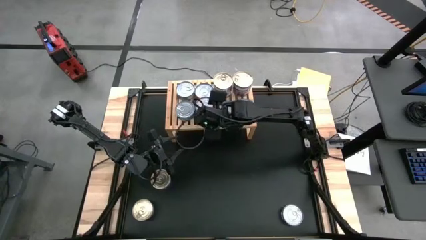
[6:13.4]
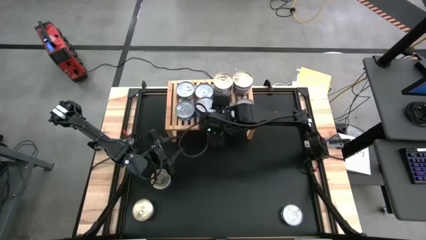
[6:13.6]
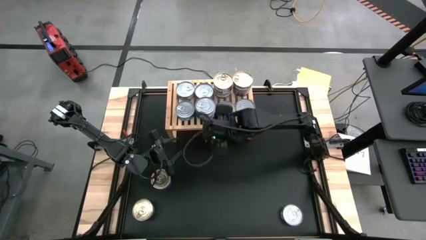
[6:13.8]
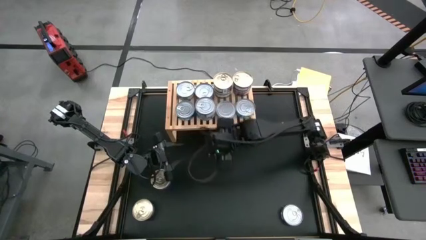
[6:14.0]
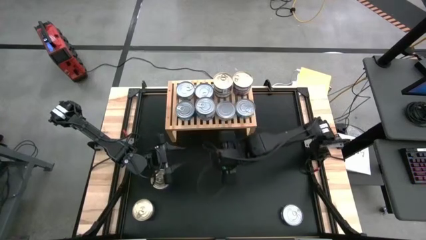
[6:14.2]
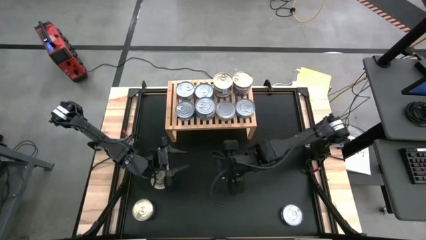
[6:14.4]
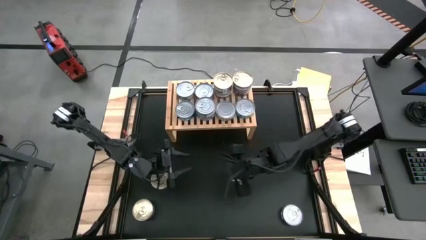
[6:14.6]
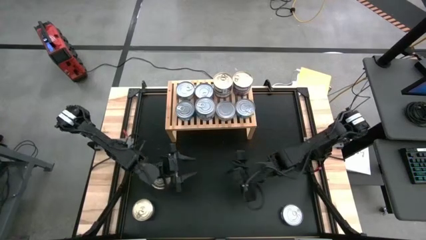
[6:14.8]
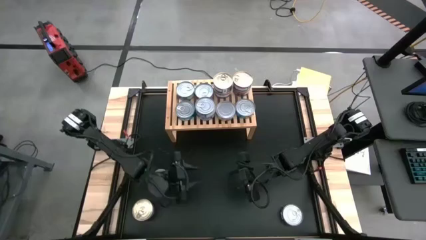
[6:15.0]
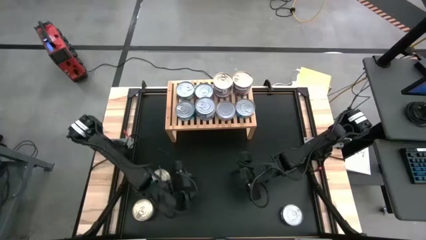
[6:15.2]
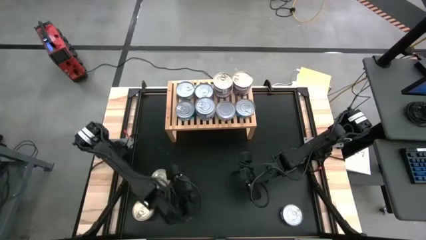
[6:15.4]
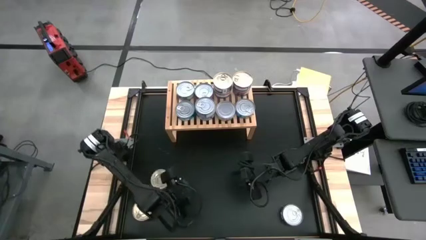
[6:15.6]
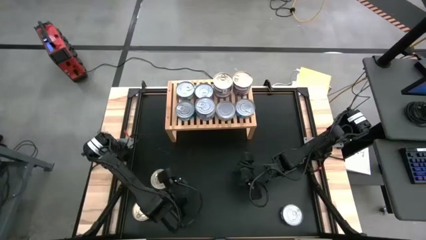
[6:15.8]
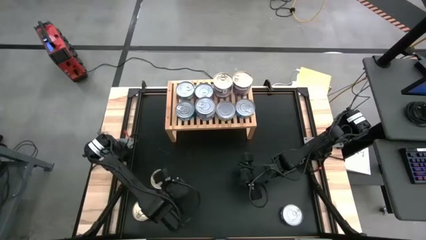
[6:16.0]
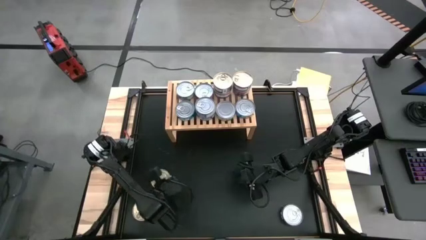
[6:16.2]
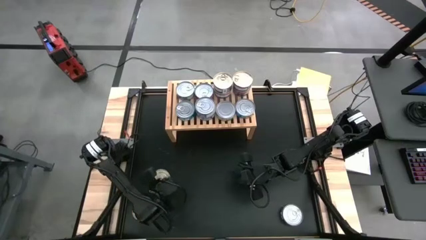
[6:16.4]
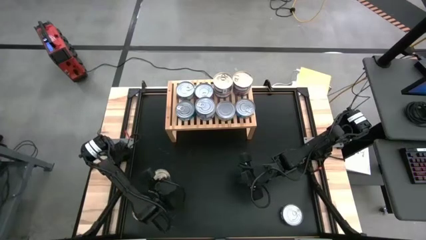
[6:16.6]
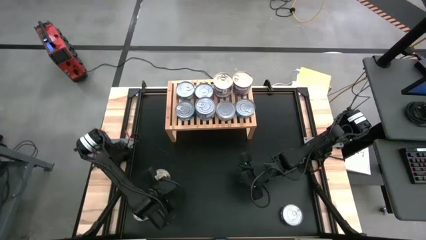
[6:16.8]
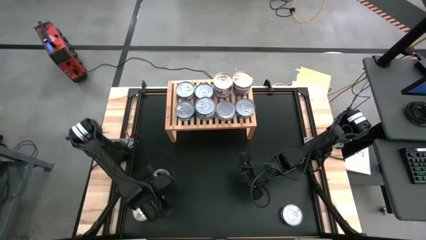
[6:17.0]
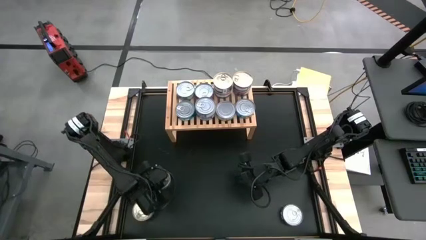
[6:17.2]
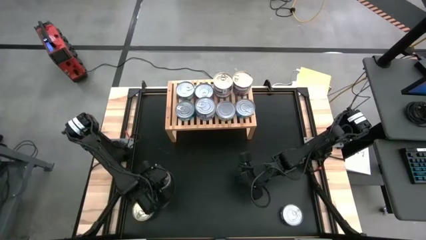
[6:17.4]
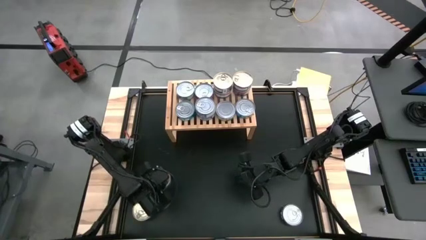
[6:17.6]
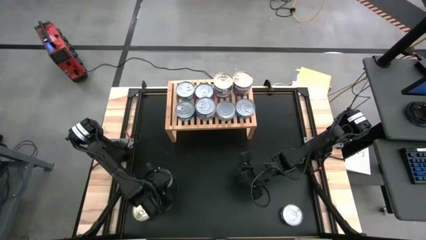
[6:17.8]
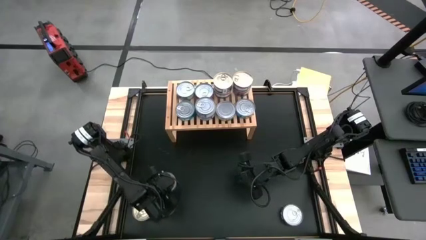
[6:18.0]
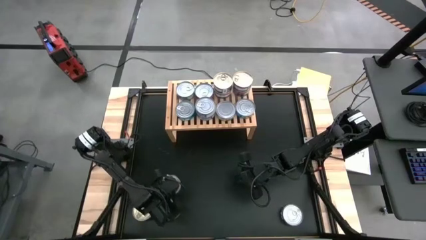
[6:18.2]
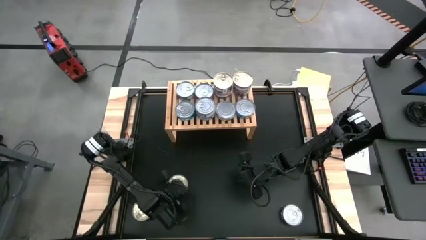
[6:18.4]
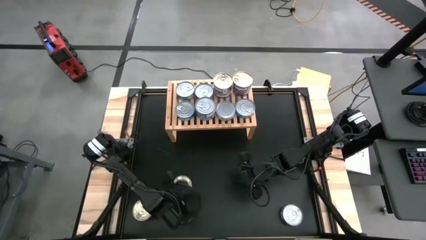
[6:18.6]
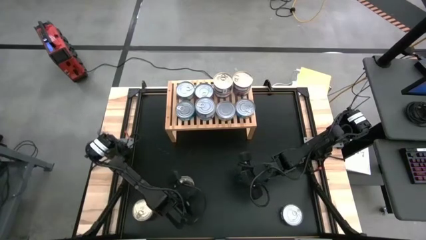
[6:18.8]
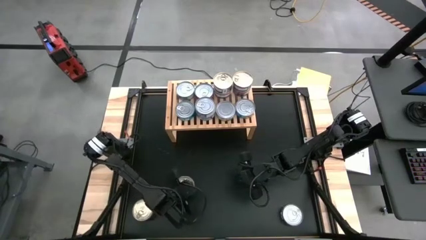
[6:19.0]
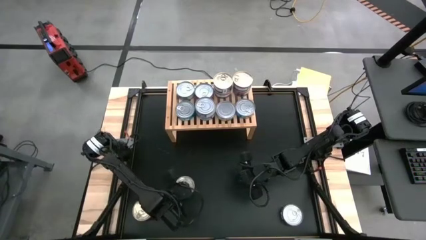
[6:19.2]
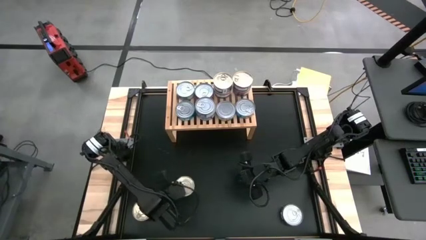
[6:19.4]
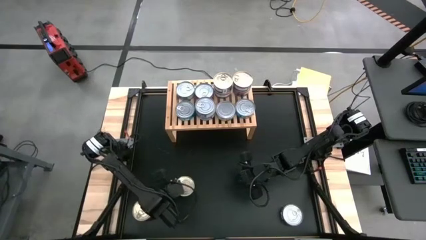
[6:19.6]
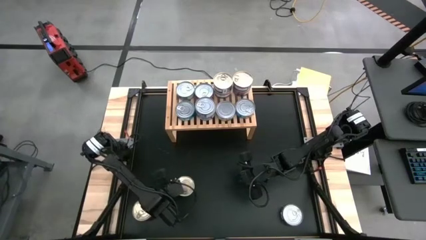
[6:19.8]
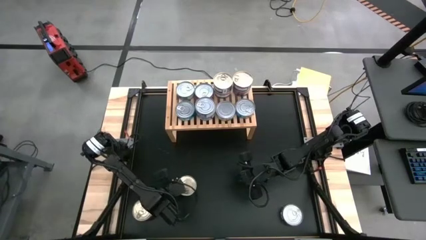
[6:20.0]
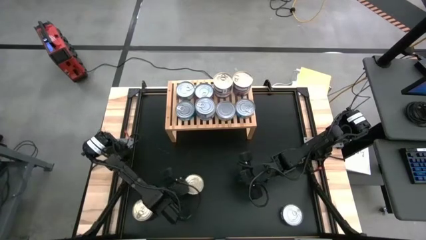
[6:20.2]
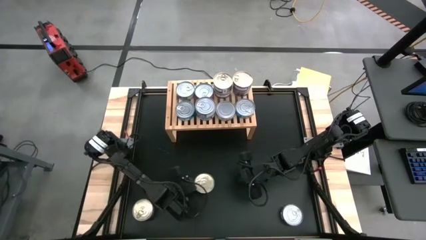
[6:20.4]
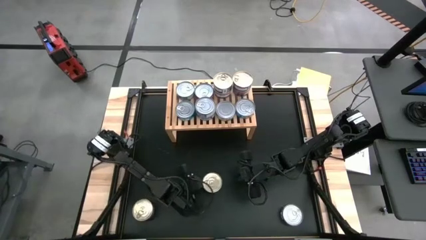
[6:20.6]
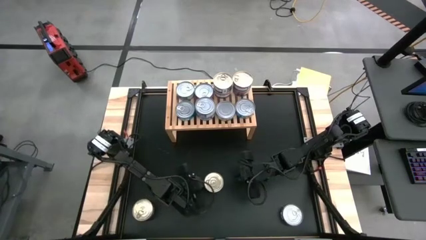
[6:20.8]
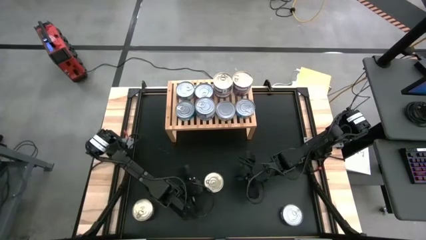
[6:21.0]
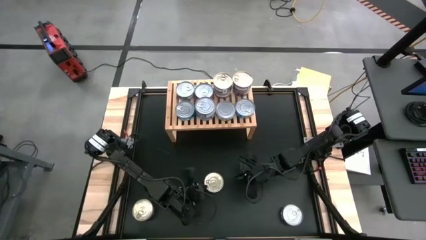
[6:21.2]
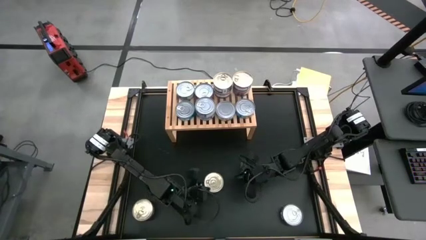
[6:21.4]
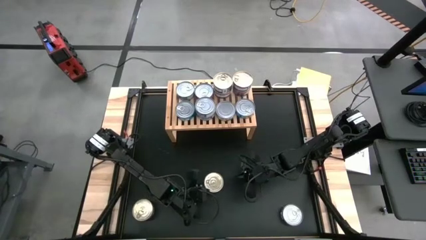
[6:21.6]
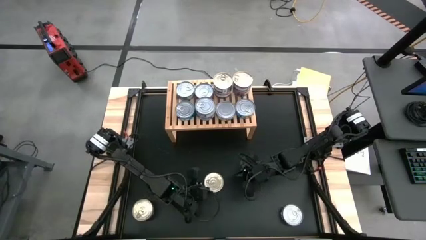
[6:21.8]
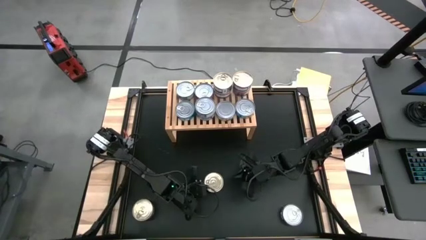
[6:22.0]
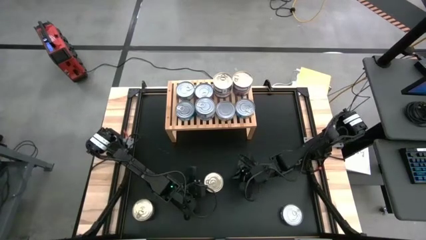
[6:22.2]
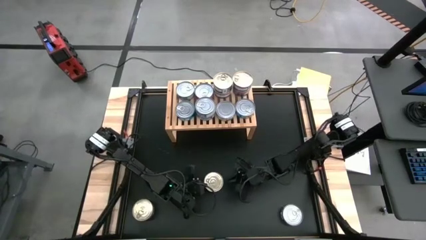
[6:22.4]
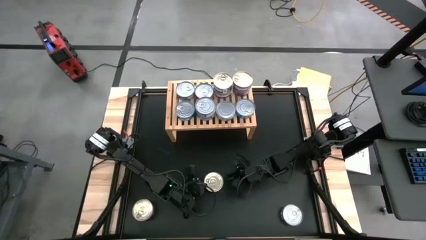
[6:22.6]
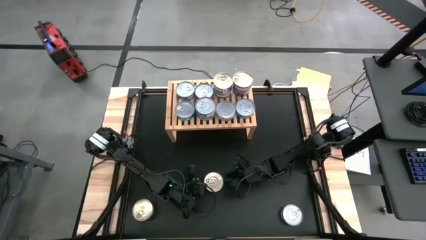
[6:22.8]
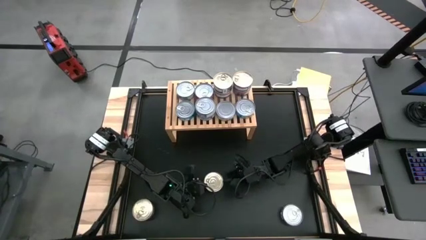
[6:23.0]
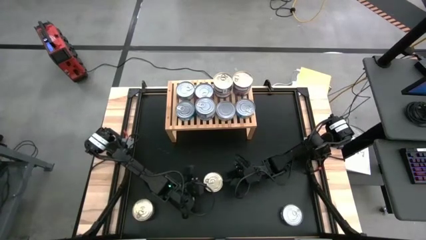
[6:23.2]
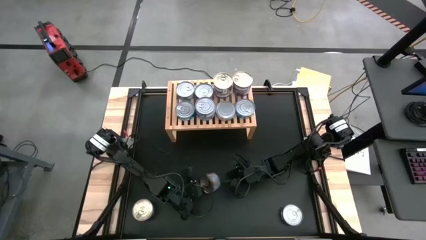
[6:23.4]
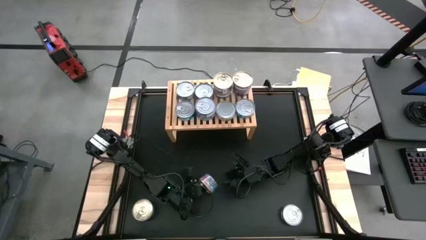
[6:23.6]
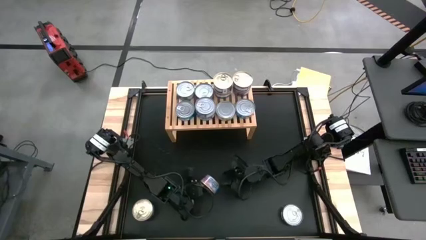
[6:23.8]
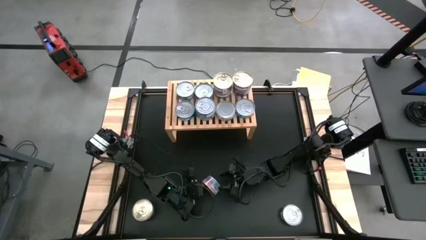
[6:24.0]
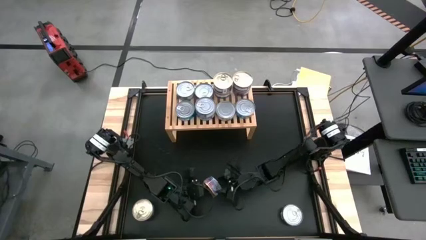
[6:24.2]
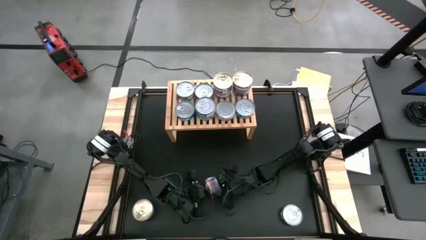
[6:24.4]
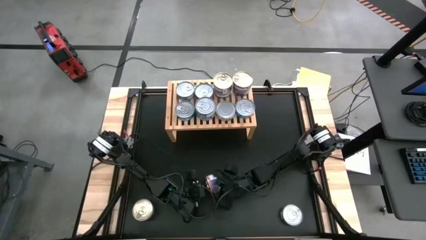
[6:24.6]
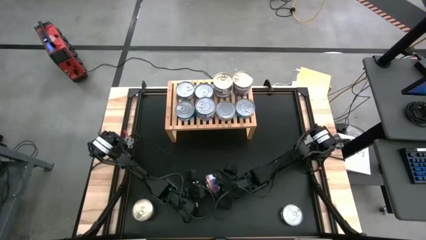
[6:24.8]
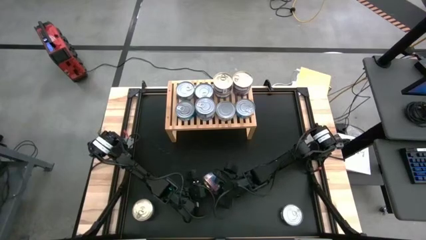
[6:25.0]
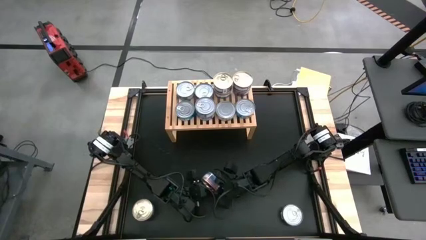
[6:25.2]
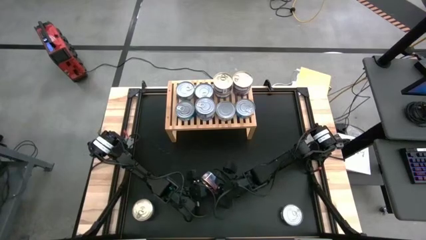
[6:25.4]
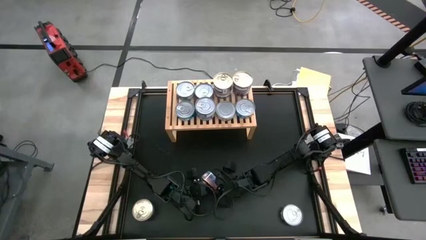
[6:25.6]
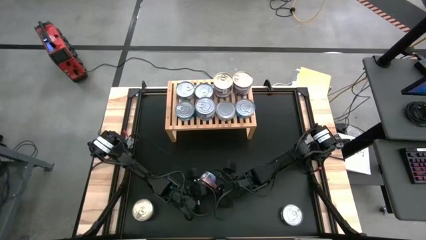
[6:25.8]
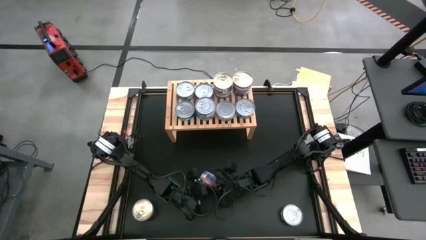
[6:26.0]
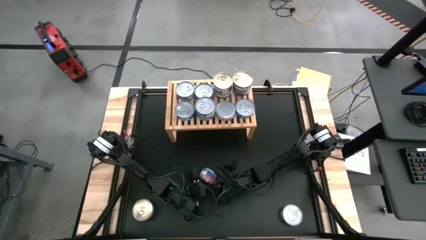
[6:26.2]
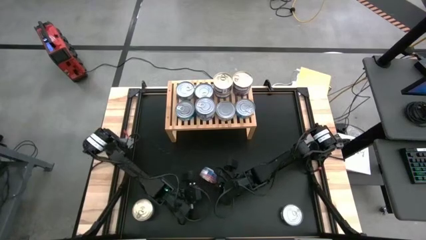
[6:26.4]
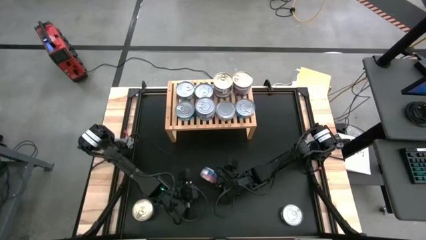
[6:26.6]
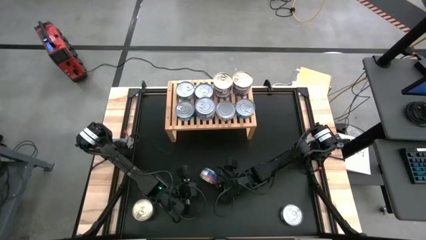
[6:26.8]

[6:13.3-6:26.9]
Task: Stack canned seafood by type on shelf
Stack the blue and pink tuna can on top of the blue and pink tuna can

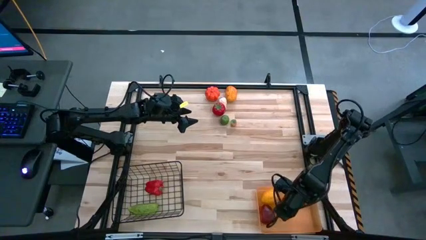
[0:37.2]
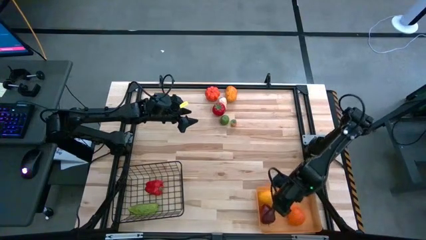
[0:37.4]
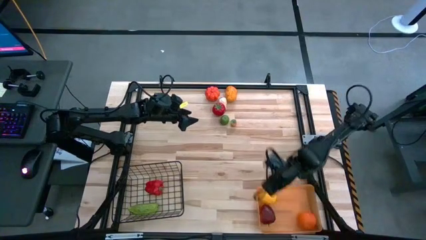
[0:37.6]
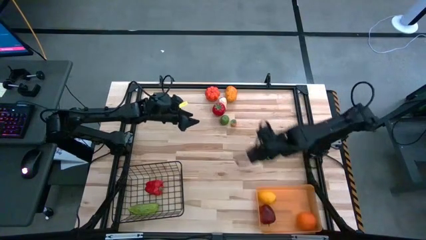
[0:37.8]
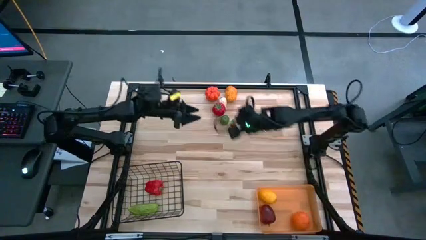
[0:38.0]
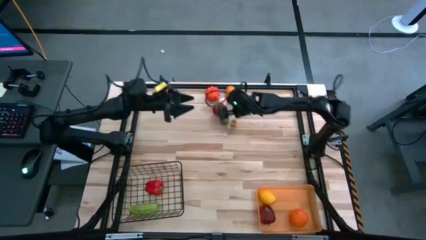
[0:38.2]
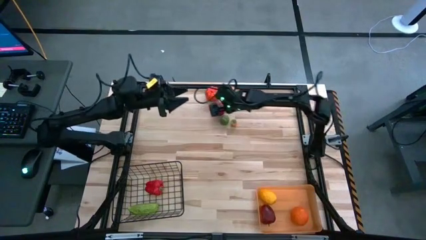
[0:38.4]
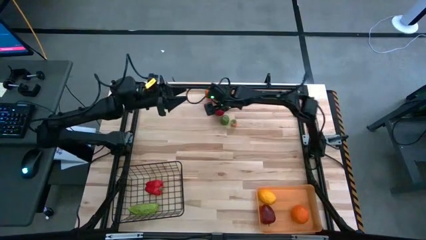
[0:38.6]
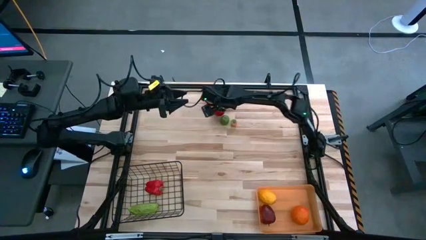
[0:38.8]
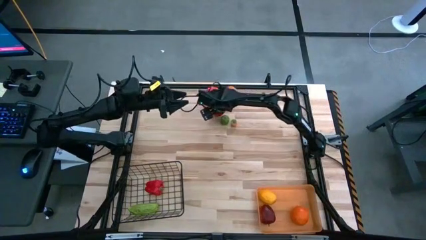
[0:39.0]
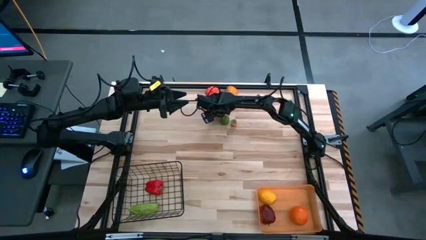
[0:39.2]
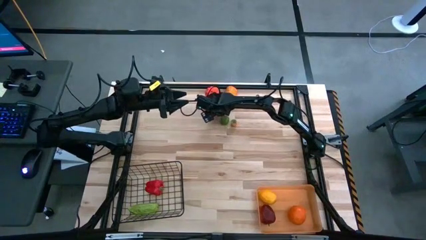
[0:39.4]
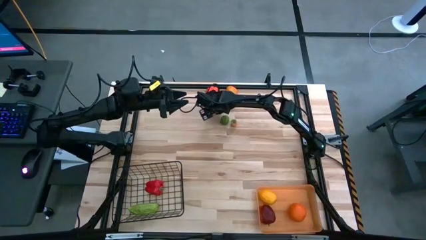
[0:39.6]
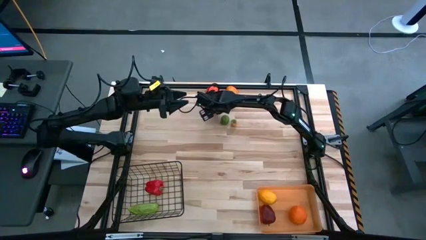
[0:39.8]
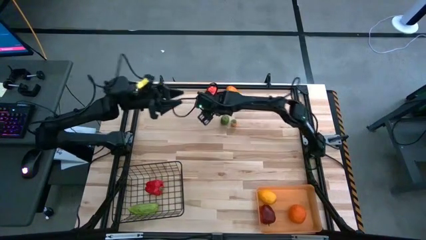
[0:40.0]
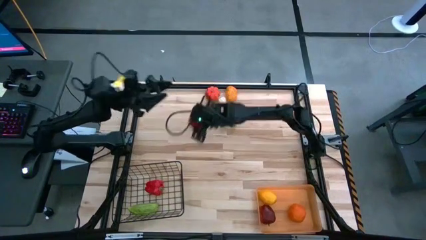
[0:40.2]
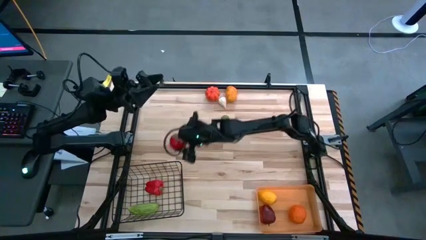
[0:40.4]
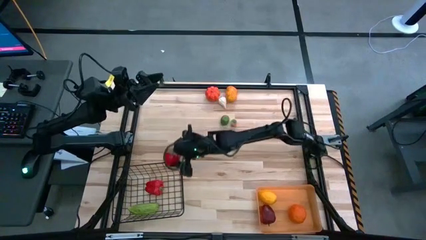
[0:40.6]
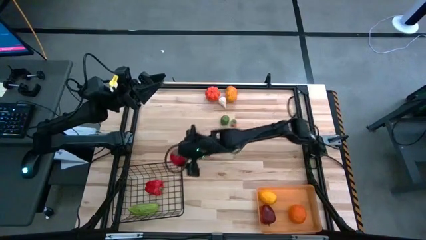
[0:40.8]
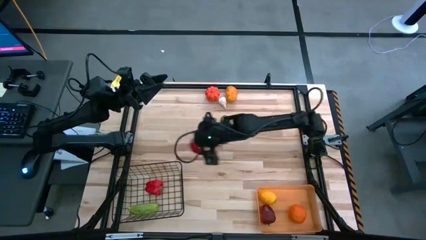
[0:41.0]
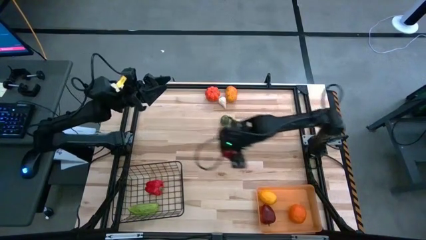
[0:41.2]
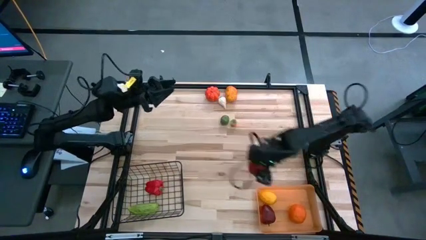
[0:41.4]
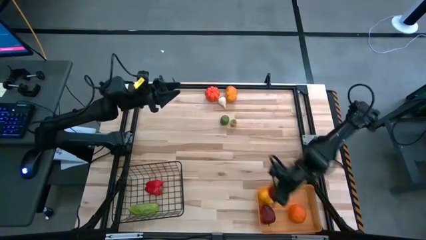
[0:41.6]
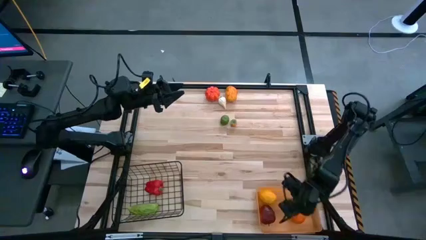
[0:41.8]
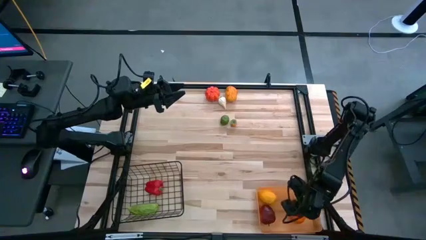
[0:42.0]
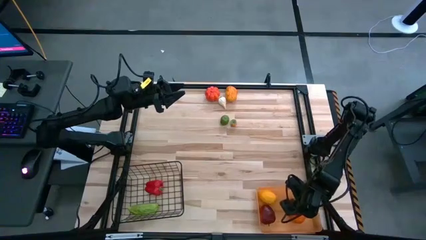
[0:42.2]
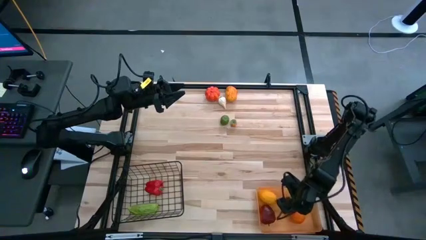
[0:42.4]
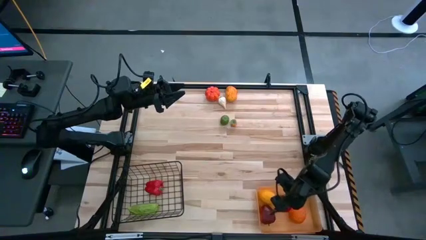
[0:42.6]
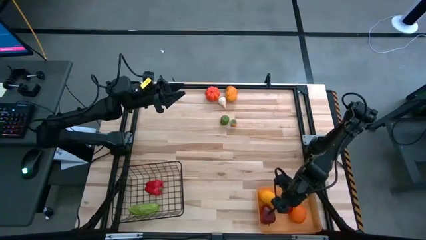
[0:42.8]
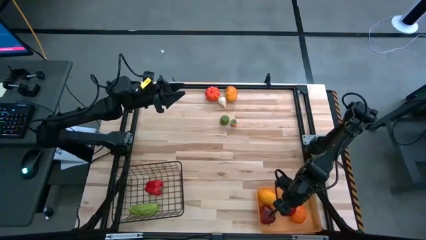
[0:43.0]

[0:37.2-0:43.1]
Task: Sort produce into baskets
Put the red tomato into the orange bin
